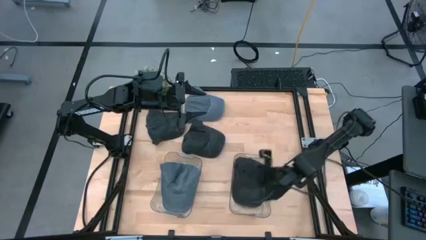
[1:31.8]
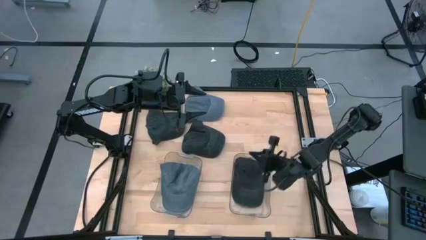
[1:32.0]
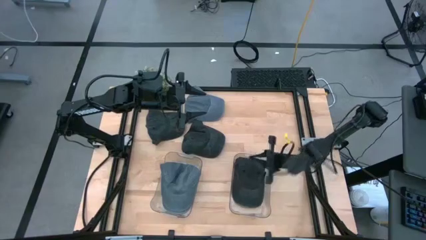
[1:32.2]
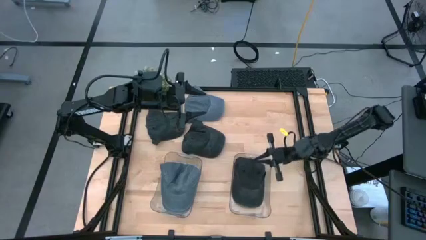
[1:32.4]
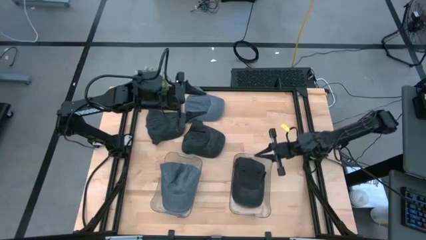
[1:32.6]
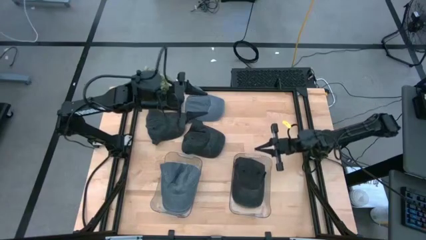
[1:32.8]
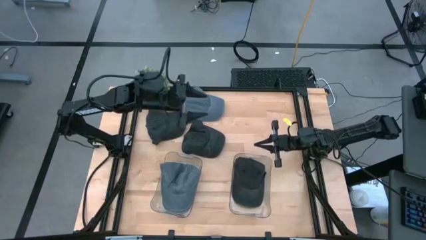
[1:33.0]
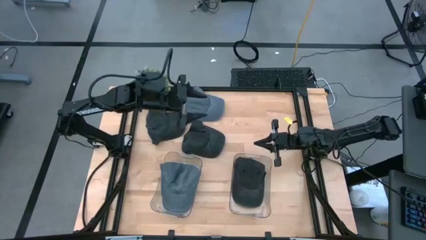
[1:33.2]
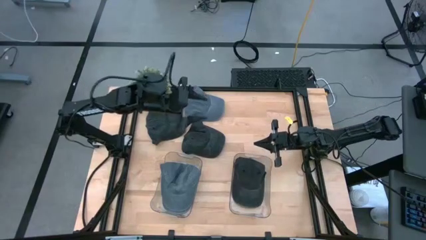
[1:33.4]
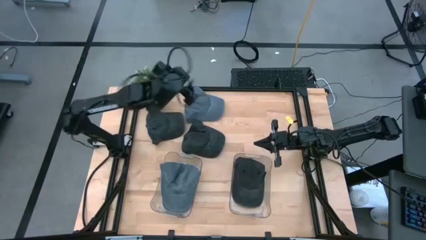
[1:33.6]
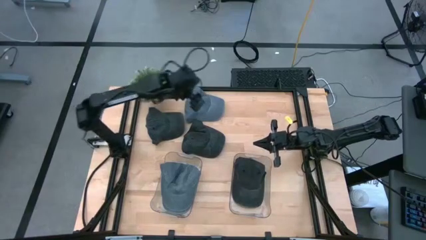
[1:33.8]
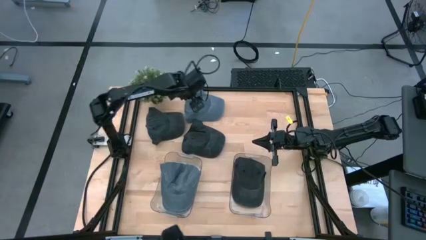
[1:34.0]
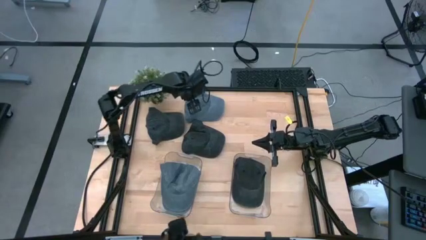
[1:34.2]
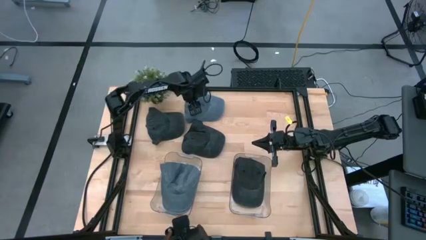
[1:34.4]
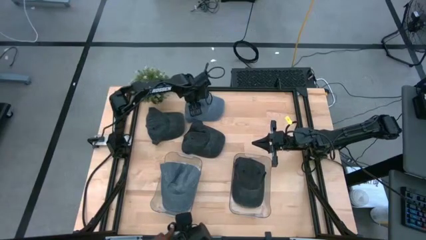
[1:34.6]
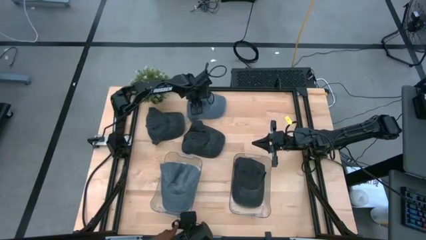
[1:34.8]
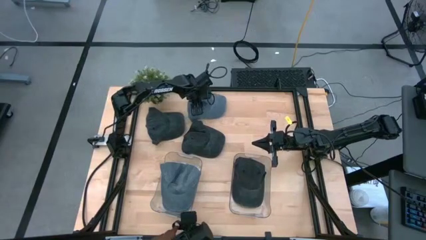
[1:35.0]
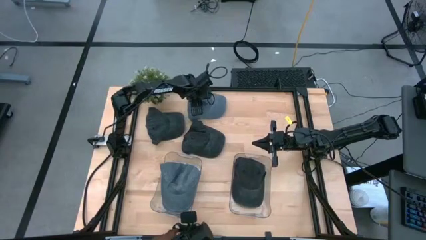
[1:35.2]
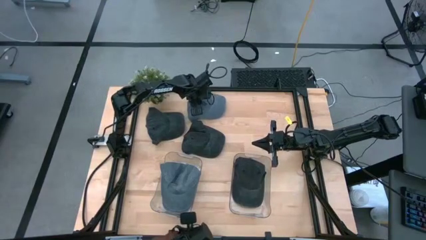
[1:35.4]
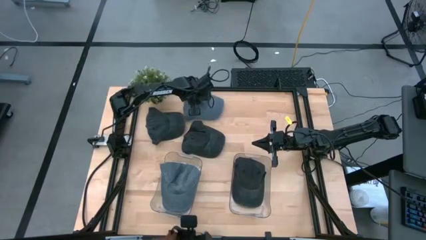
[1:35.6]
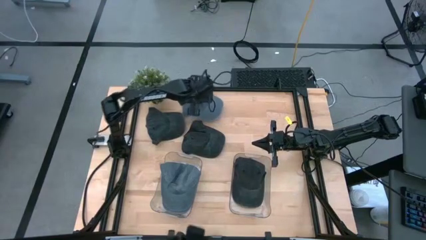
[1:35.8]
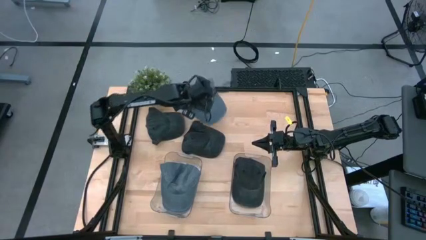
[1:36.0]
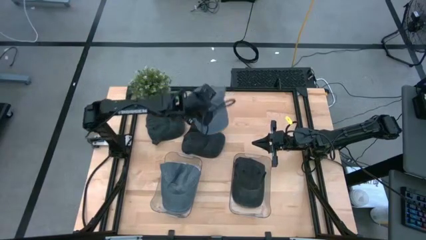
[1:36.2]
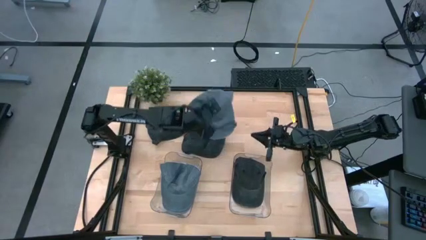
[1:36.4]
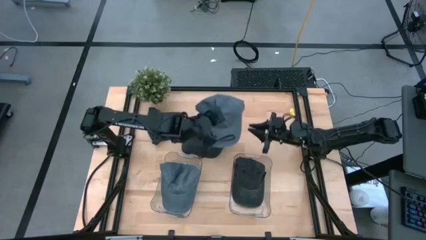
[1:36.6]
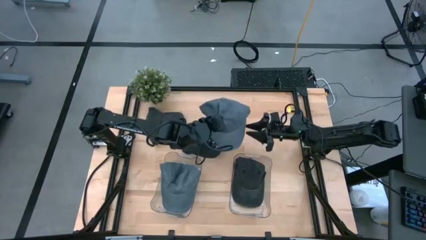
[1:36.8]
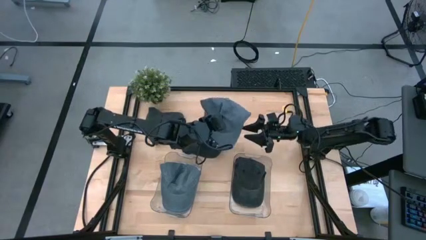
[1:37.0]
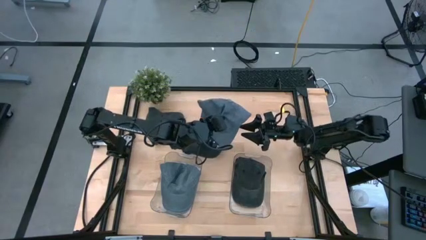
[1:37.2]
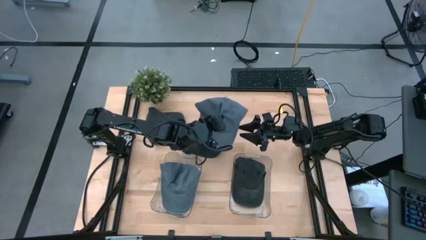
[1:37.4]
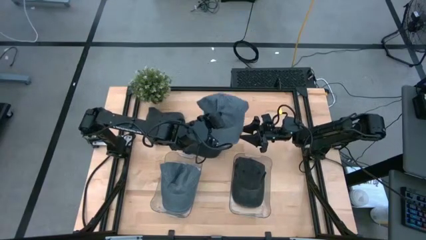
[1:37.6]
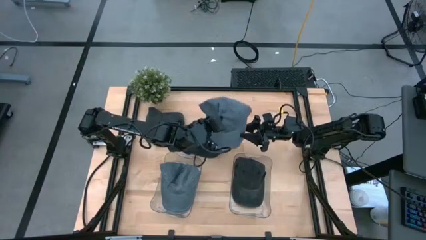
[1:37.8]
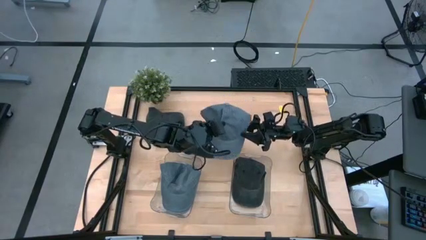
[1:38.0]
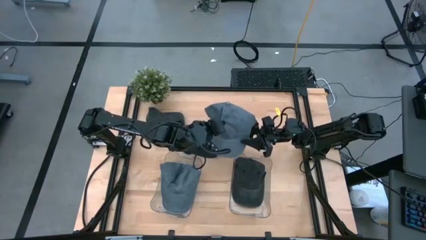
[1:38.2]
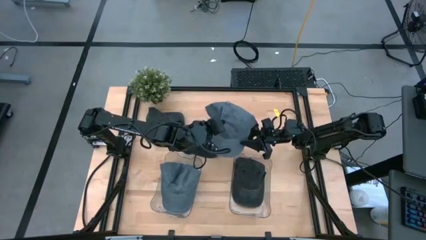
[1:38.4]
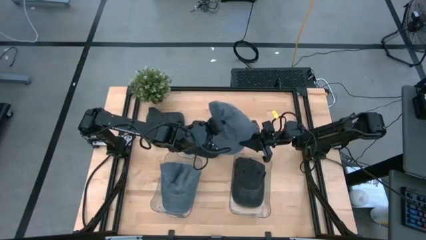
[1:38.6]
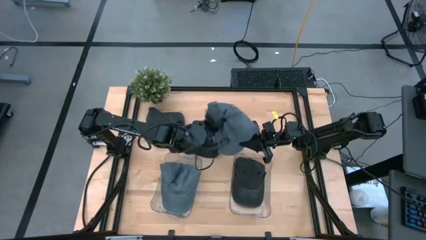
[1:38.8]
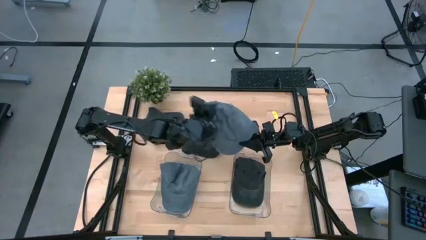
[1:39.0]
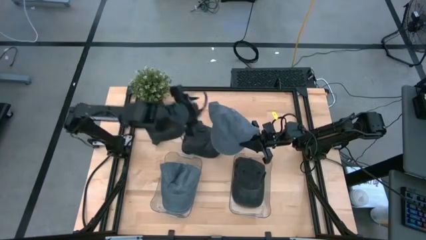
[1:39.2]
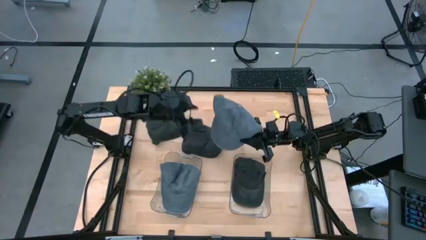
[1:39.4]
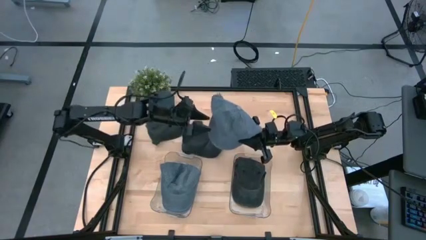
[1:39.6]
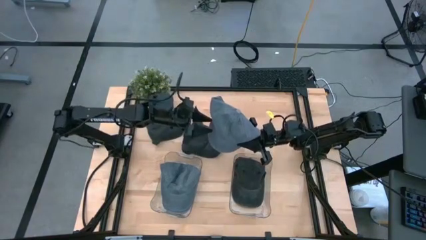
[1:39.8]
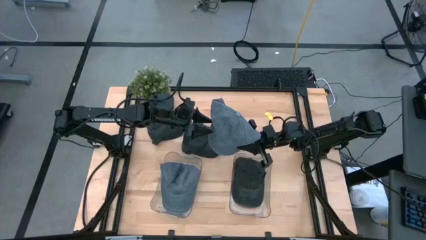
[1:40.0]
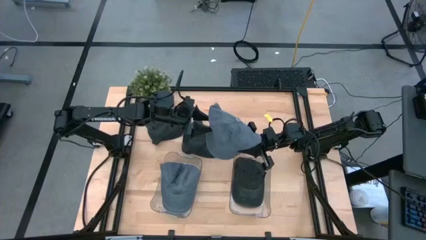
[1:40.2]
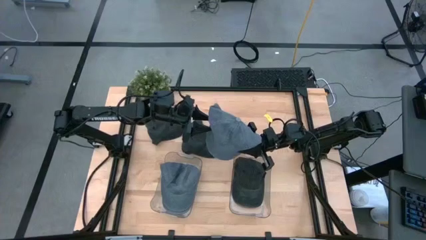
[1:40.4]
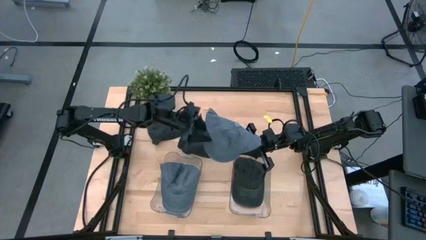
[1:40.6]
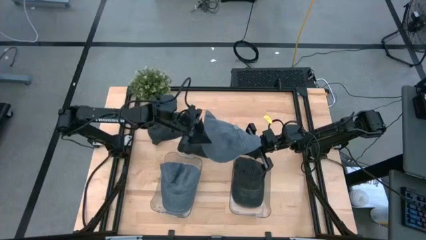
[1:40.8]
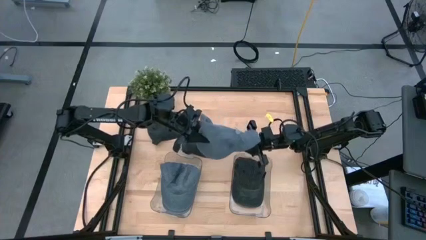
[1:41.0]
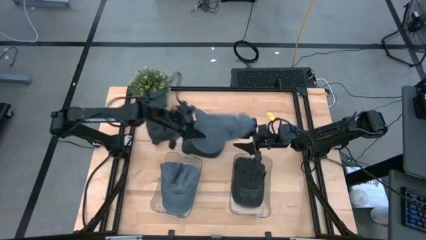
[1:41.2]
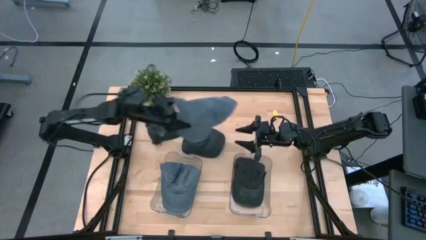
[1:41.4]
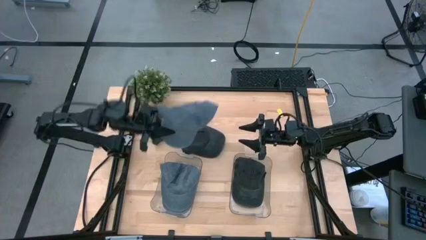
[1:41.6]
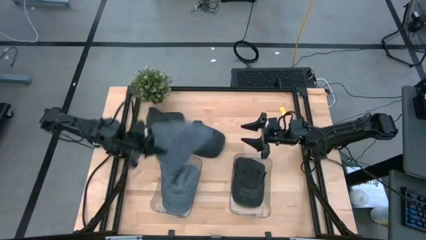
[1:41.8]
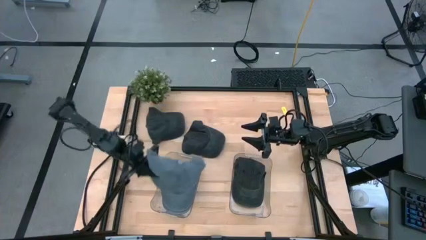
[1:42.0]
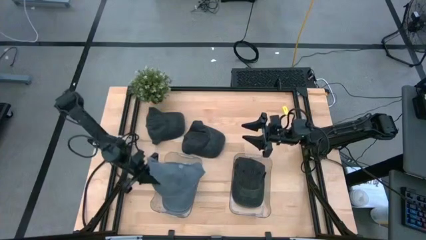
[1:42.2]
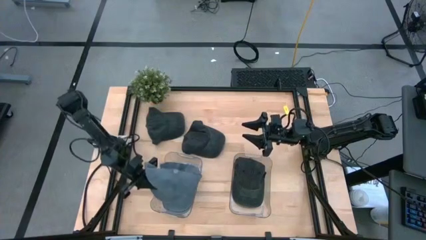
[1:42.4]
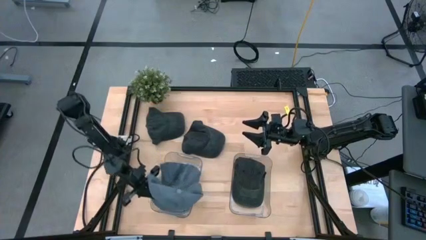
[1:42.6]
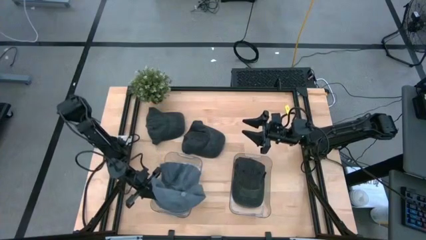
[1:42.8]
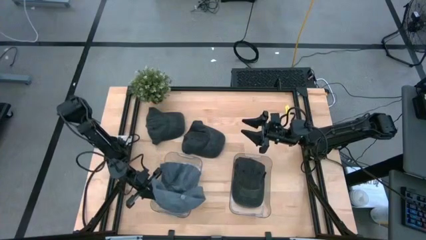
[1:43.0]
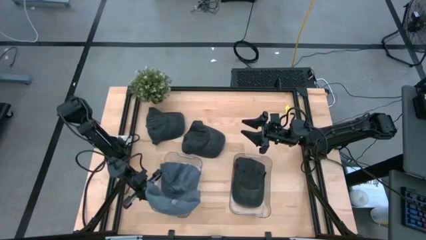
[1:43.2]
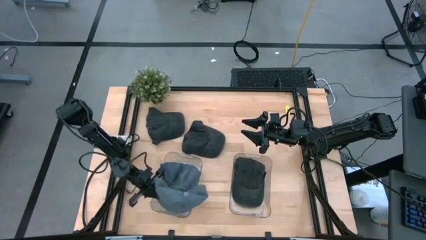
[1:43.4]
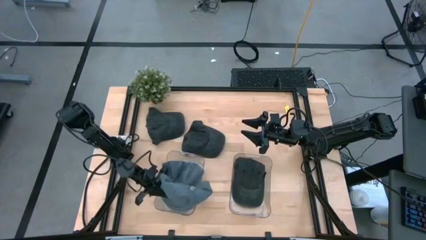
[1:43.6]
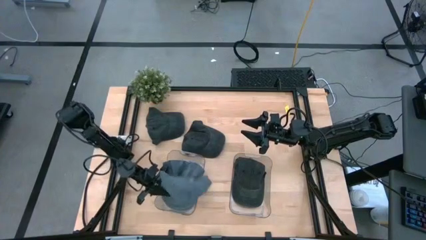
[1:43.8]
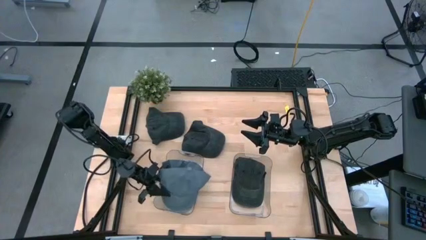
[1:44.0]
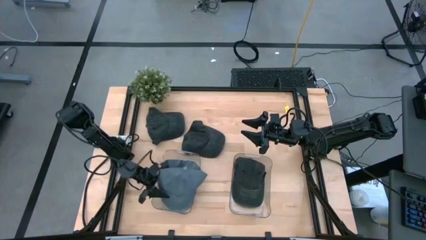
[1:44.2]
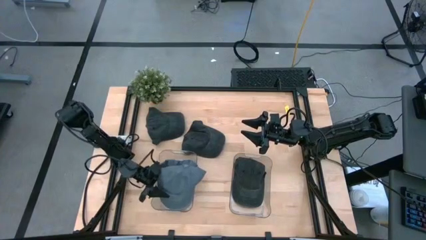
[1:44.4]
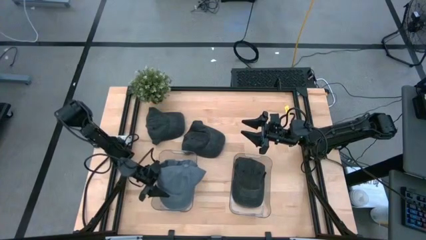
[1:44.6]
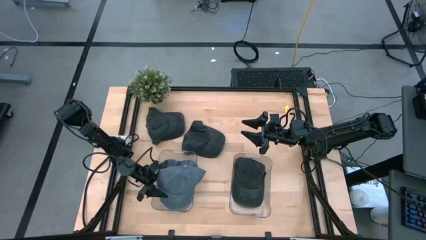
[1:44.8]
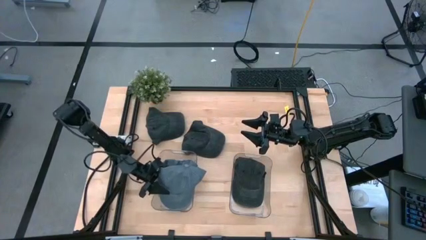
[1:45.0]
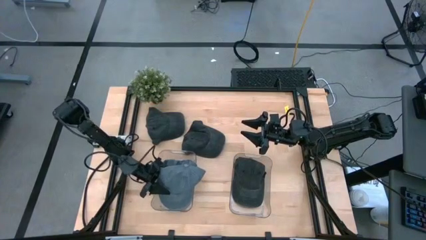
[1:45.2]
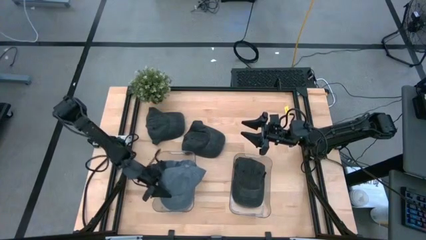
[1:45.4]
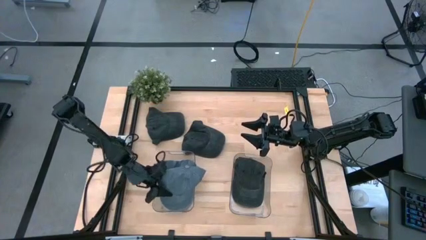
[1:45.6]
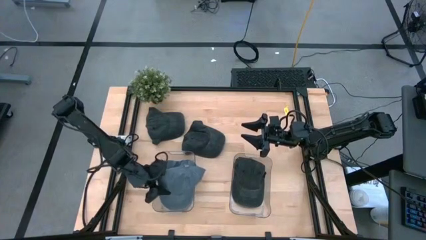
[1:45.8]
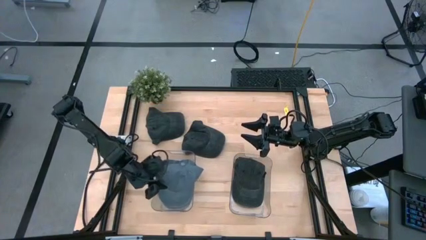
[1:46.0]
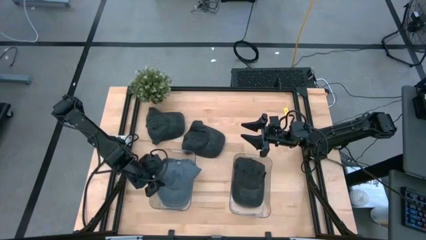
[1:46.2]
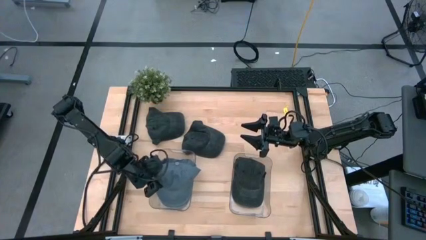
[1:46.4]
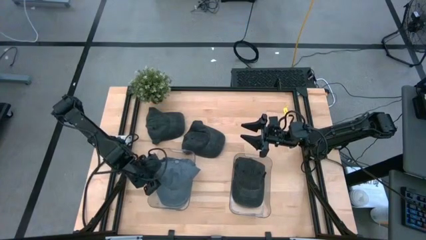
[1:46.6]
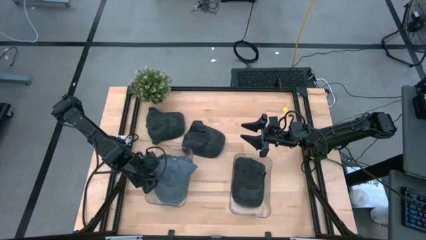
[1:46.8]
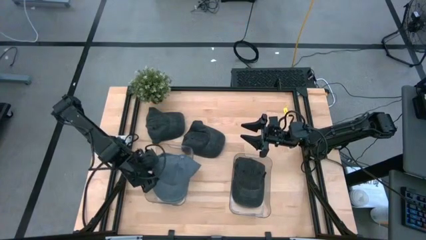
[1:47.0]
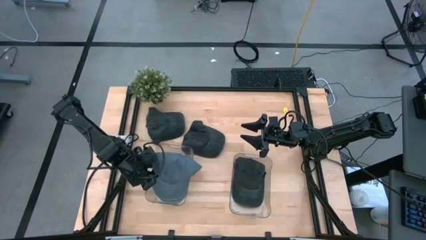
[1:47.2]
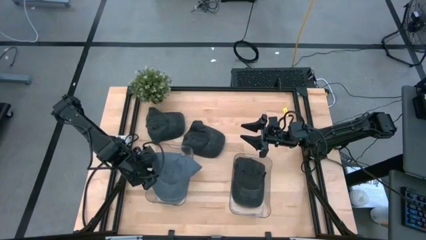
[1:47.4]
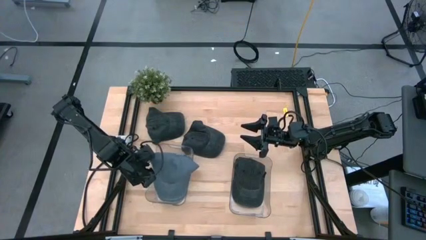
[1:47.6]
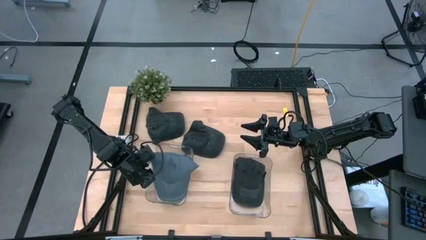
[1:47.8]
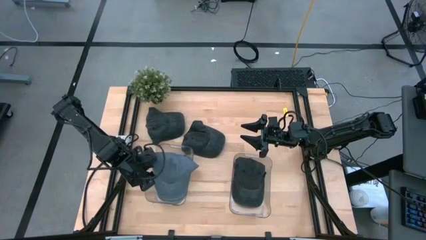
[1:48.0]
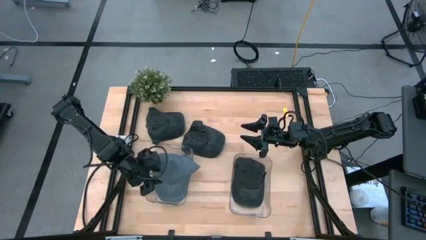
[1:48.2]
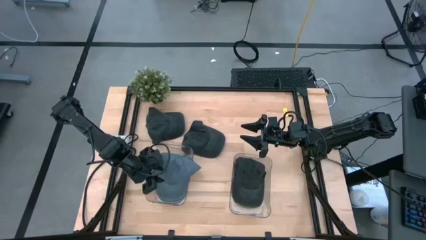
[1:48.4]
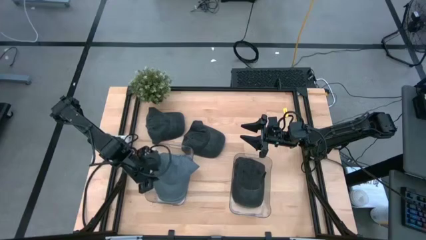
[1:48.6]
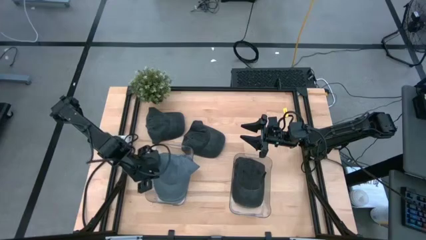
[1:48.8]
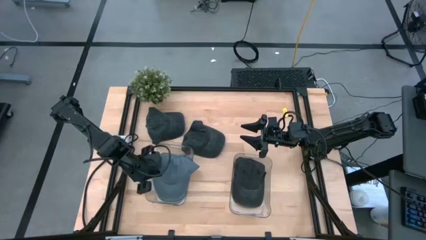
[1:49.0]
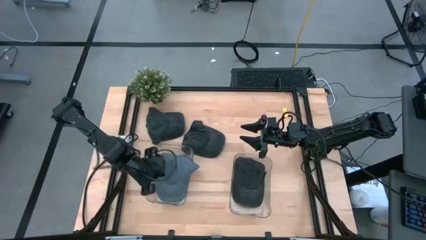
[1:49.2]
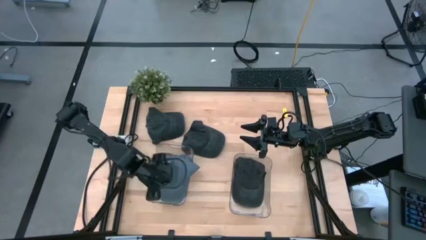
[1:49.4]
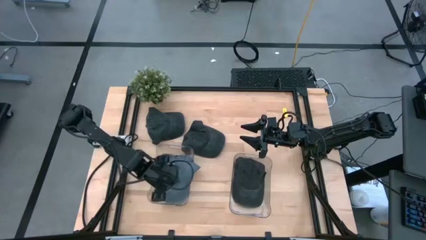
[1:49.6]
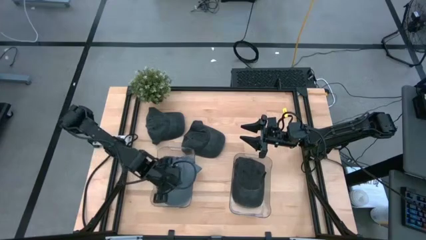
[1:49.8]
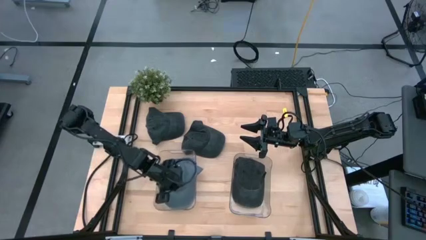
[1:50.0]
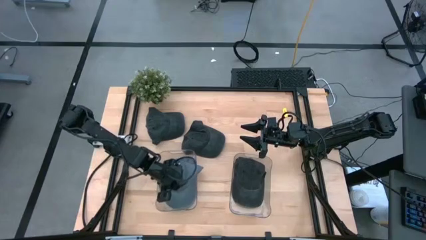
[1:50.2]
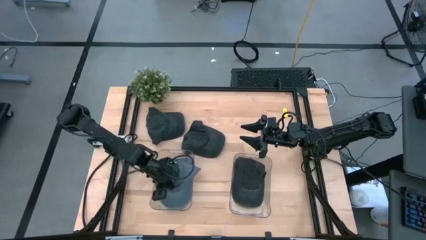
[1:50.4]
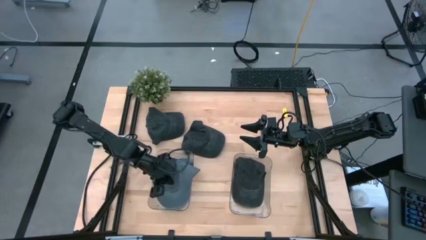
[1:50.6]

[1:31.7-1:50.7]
Task: Pick & Place hat
Put the gray cap into the left transparent bin
